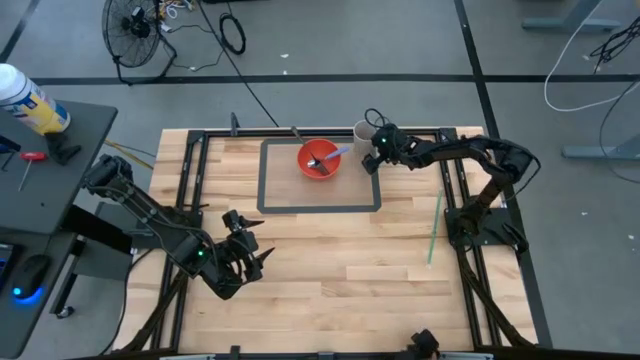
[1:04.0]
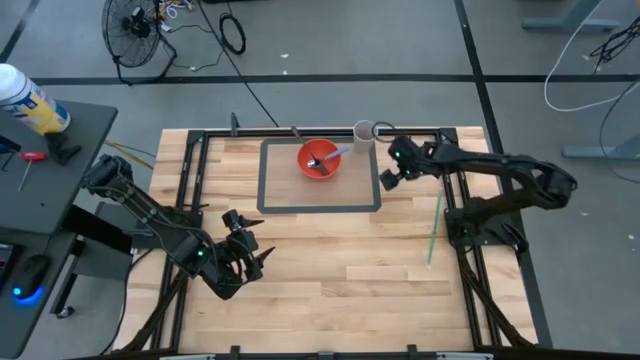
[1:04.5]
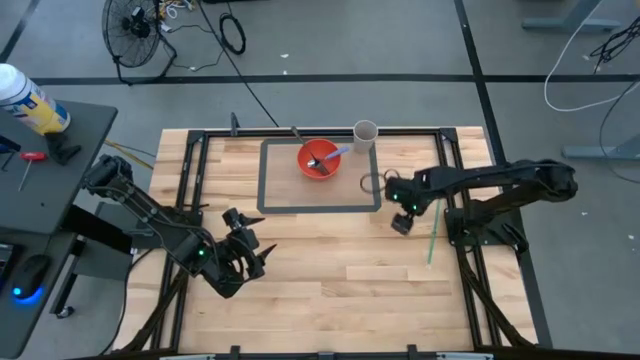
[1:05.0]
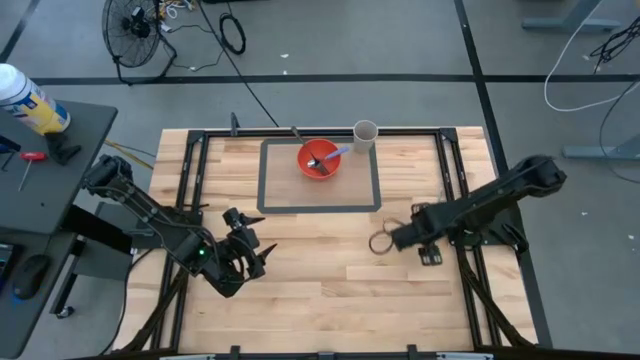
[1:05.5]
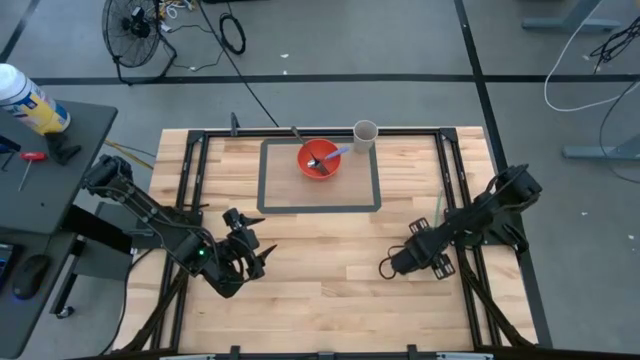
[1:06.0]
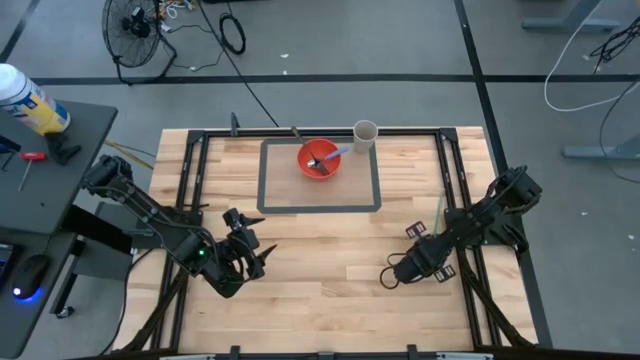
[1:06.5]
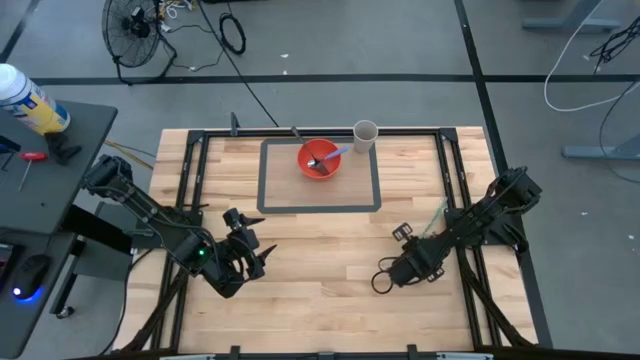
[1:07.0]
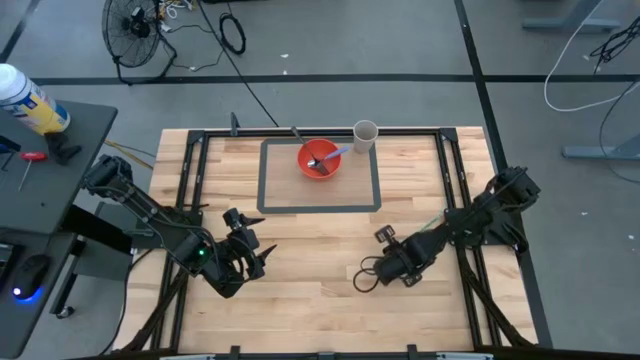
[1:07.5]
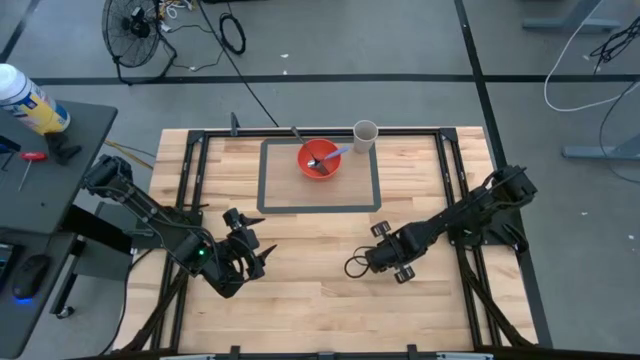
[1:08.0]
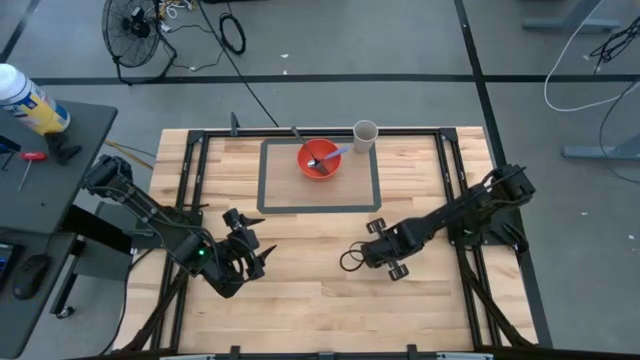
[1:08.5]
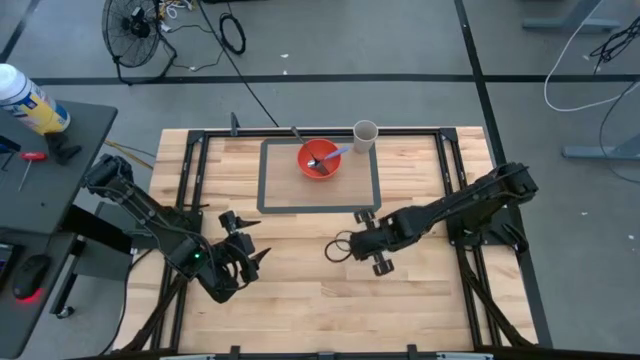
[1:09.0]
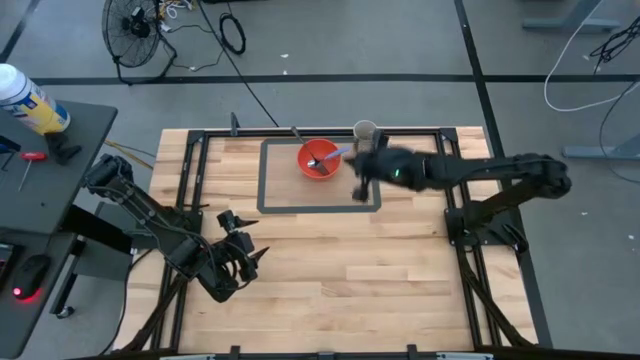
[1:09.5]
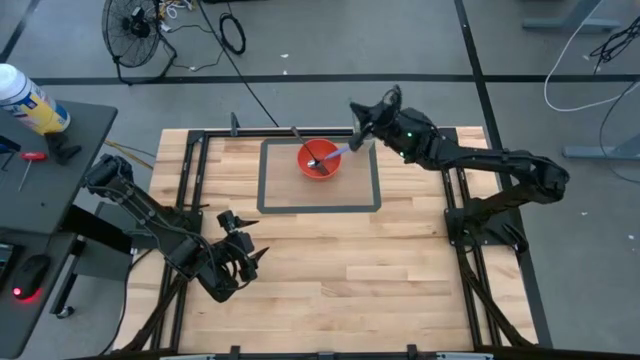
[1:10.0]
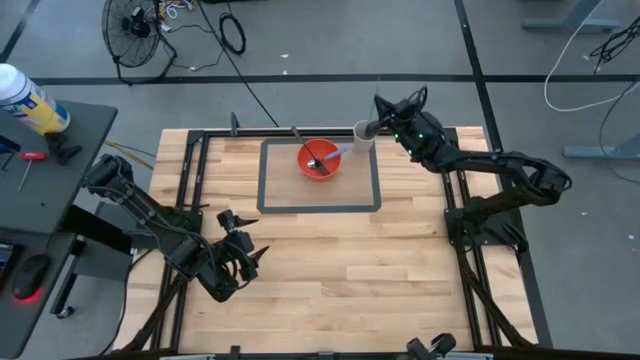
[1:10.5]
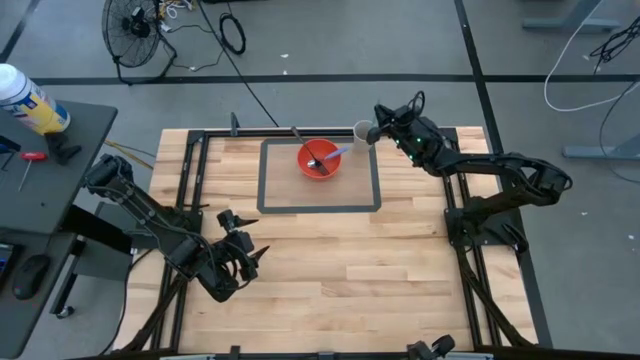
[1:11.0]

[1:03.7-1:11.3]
Task: Pick & Place Utensil
Put the green straw into the gray cup

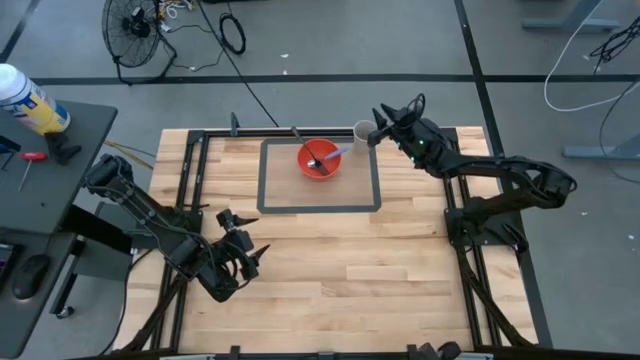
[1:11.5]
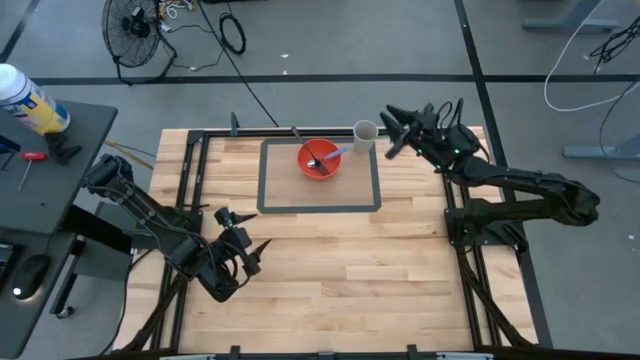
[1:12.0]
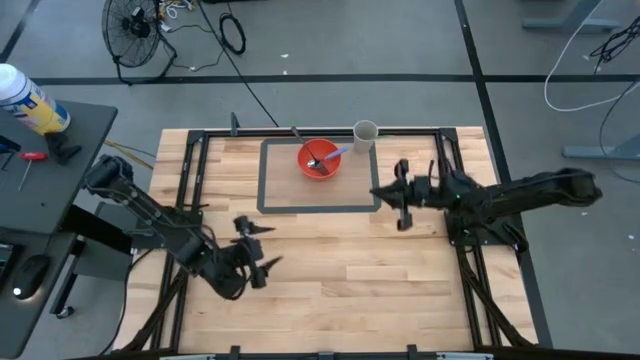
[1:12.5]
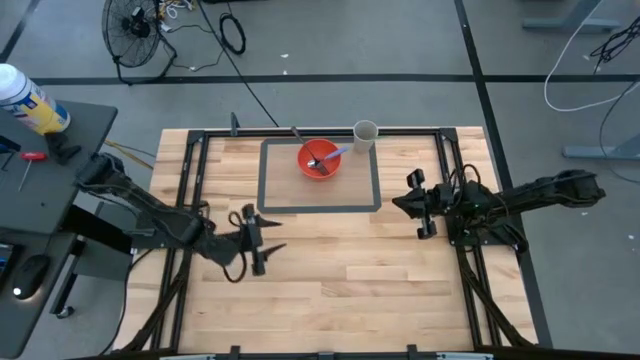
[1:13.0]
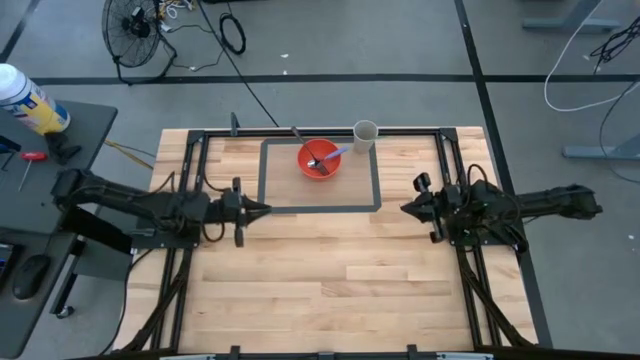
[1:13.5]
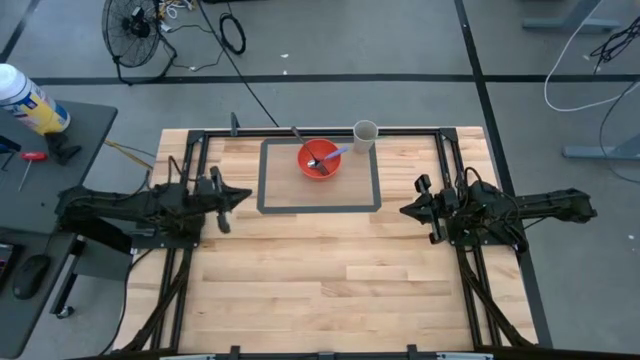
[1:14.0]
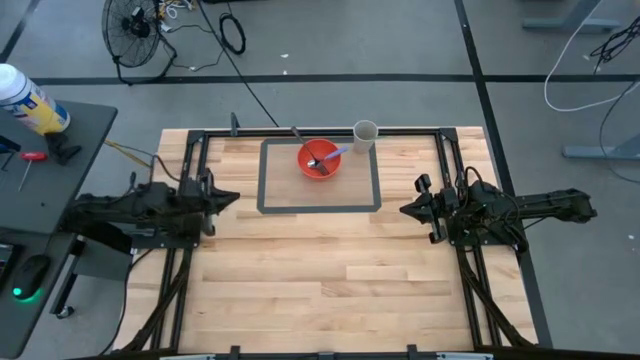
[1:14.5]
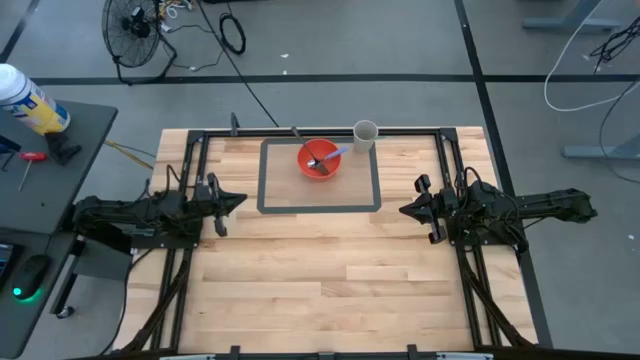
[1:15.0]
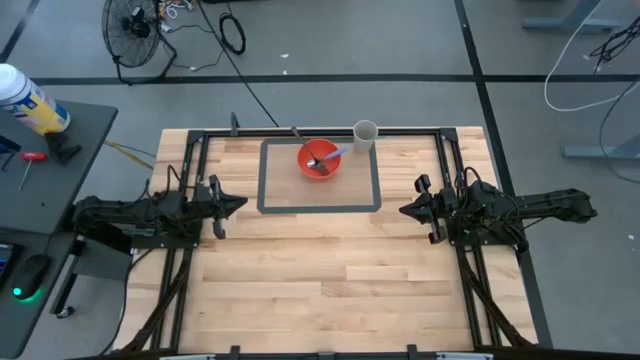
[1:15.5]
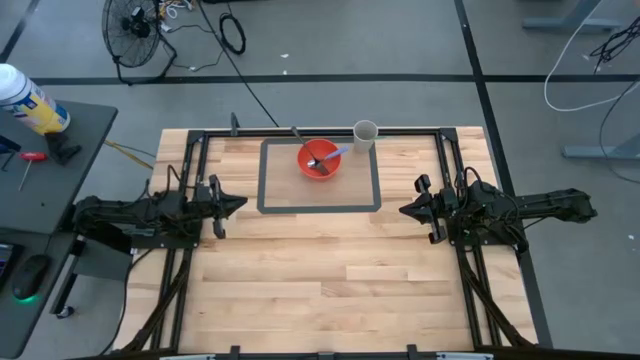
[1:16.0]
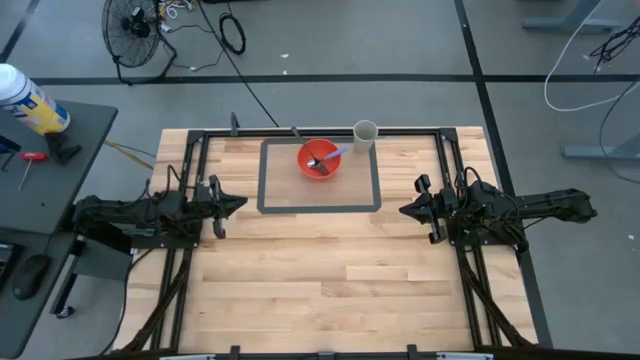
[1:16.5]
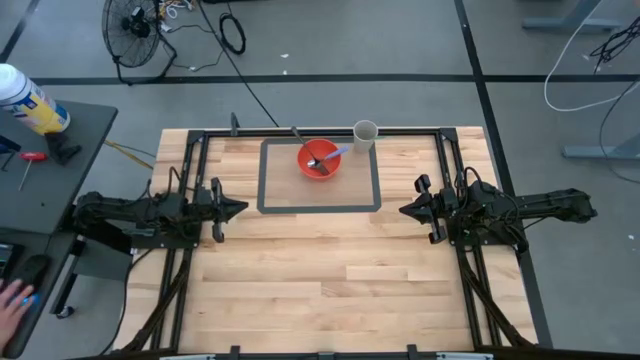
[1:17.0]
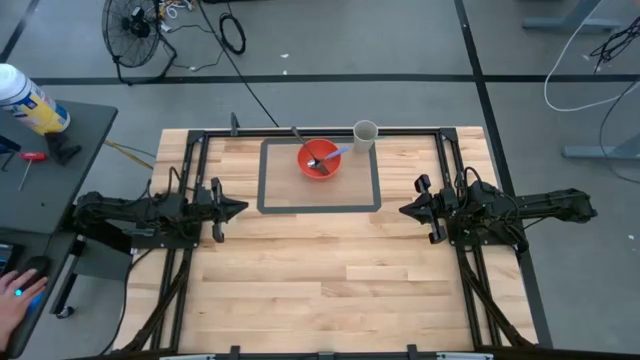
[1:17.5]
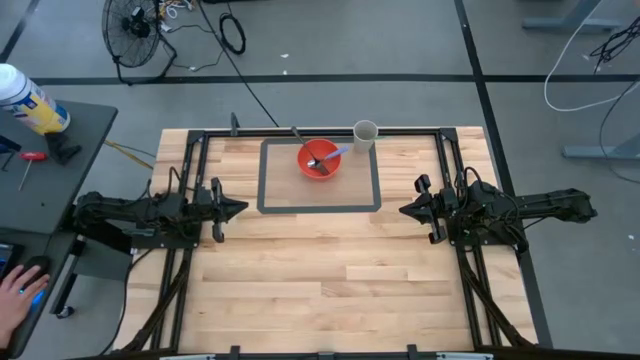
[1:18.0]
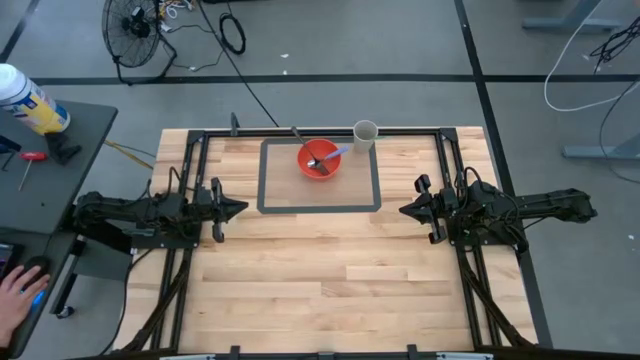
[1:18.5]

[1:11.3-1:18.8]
Return to Home Position

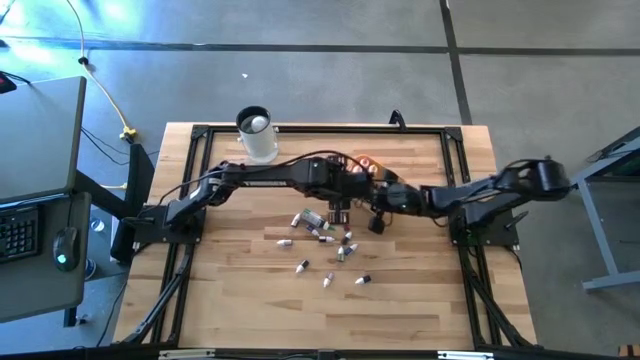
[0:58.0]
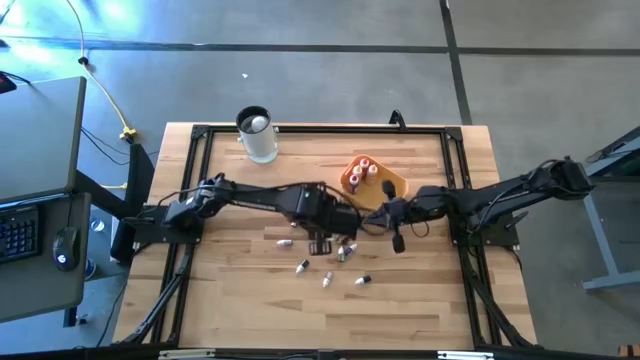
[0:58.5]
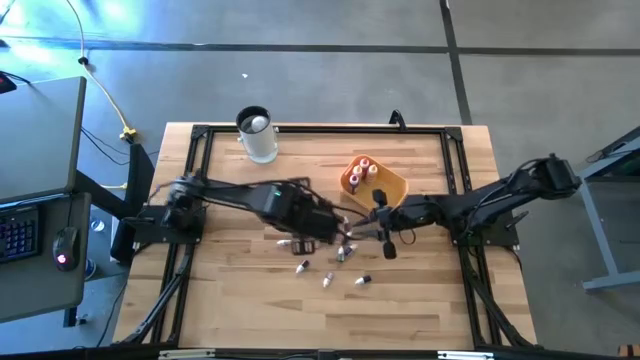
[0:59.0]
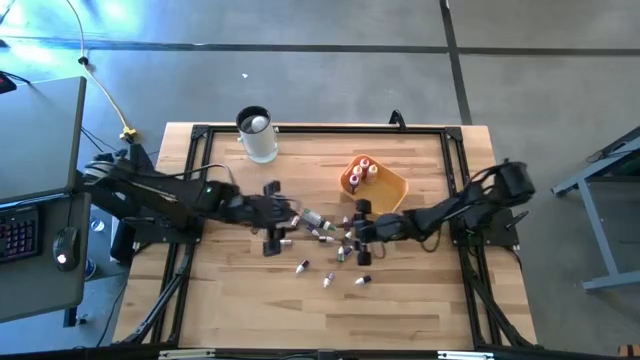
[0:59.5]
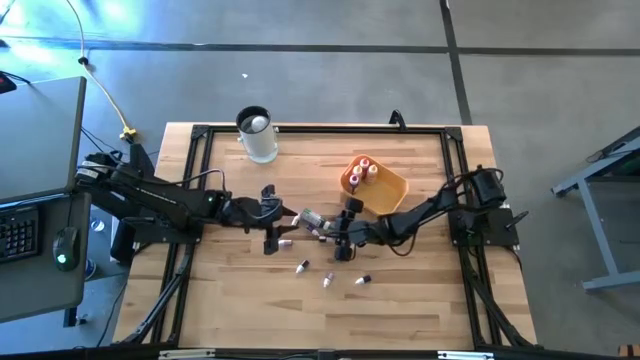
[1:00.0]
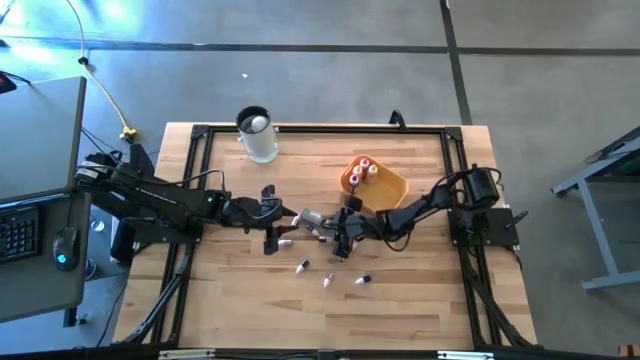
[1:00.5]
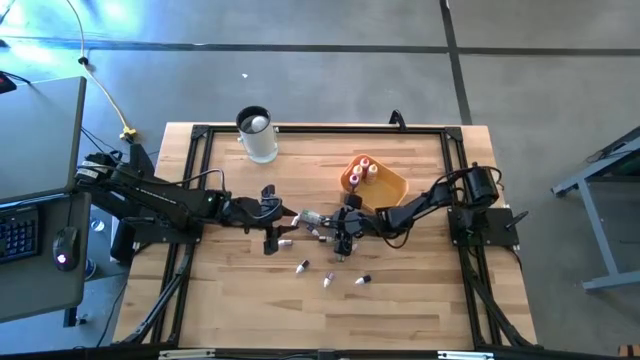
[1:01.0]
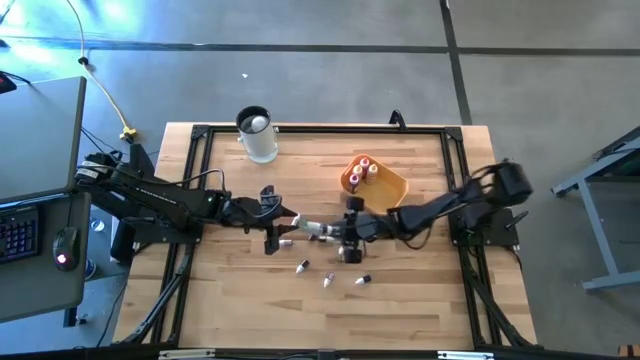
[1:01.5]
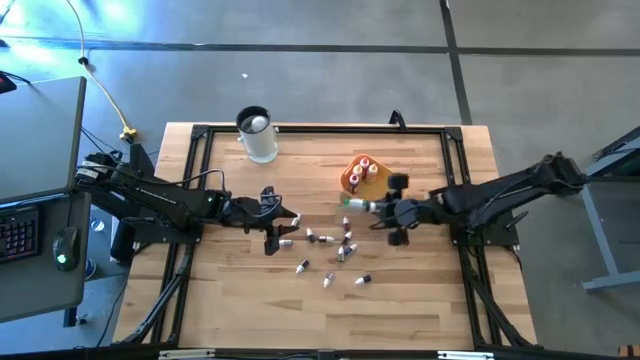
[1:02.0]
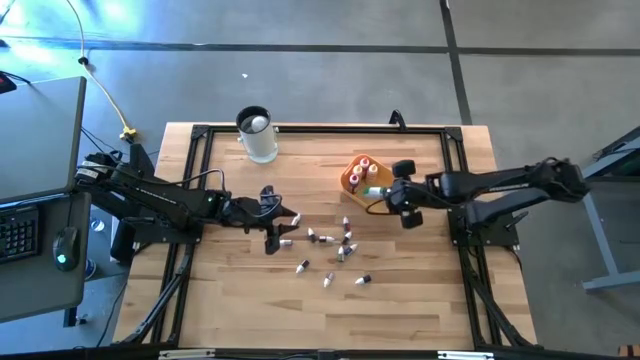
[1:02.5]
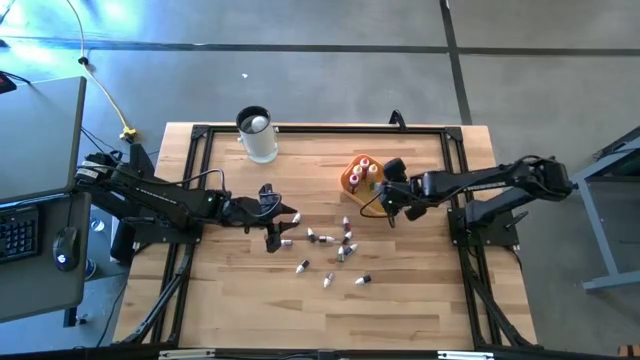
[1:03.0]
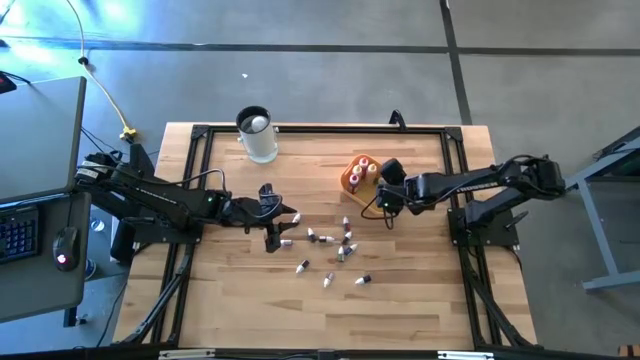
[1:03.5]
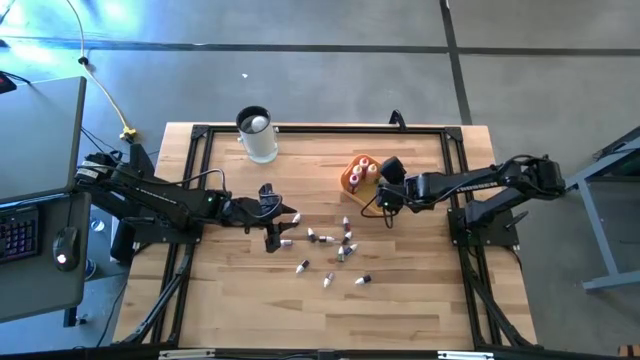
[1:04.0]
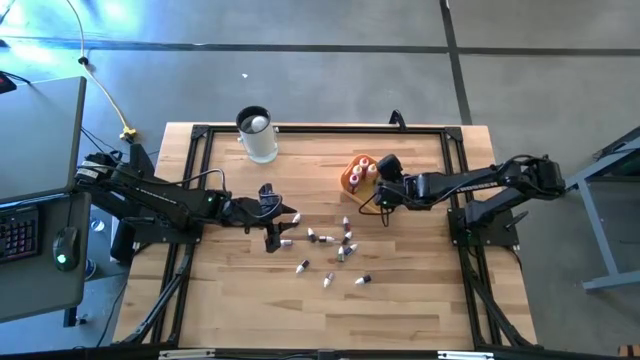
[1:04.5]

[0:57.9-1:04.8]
Task: Pick & Place food coloring
Put the large green food coloring bottle into the yellow bin
